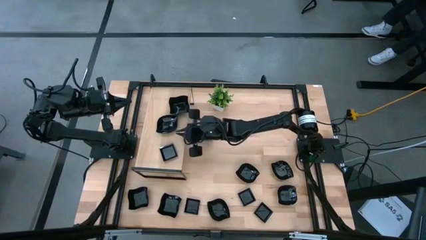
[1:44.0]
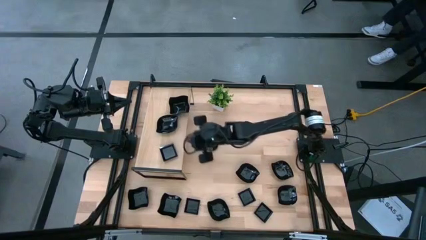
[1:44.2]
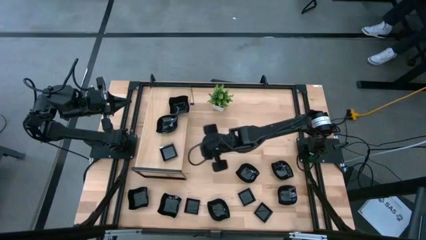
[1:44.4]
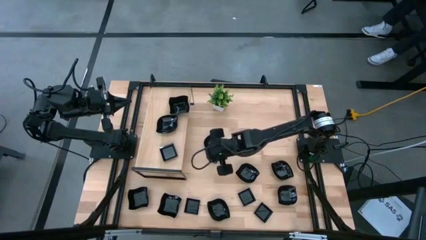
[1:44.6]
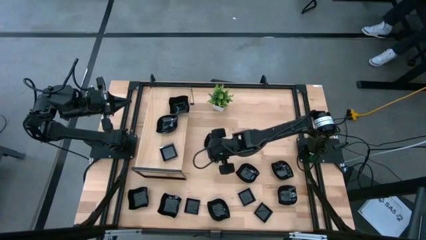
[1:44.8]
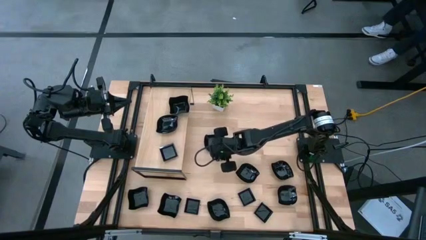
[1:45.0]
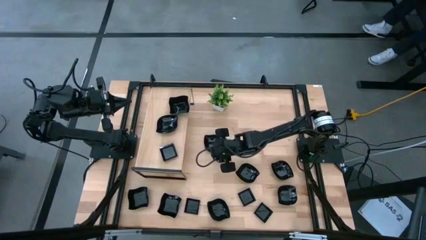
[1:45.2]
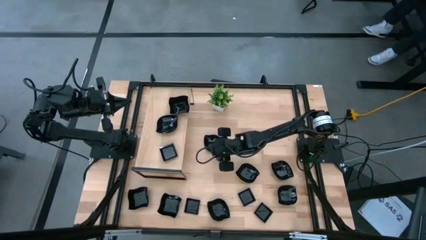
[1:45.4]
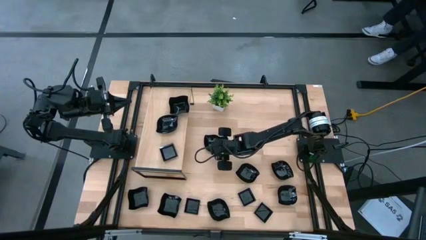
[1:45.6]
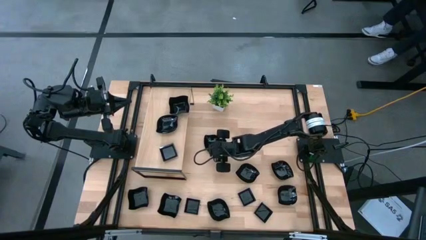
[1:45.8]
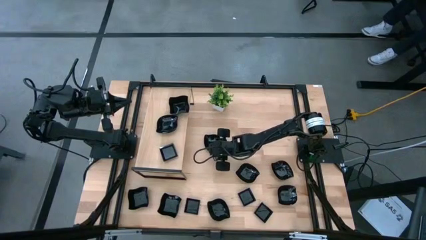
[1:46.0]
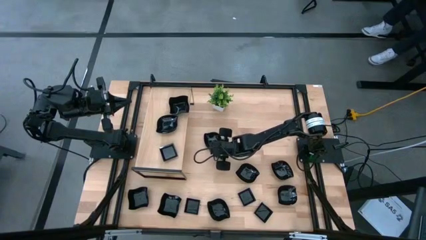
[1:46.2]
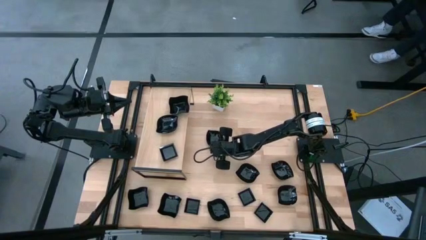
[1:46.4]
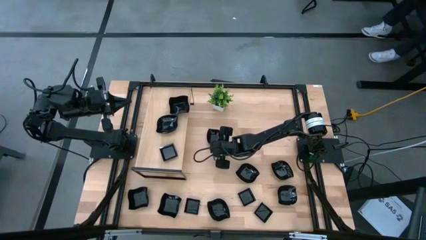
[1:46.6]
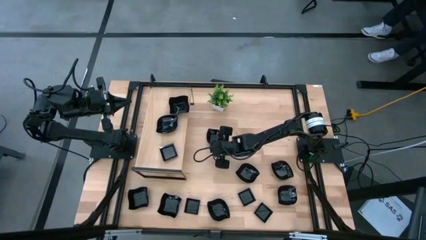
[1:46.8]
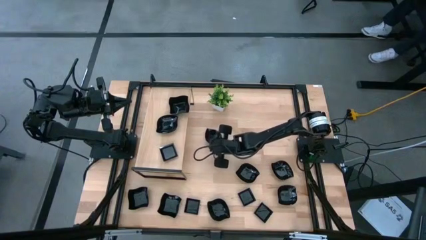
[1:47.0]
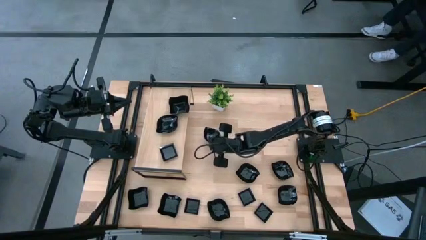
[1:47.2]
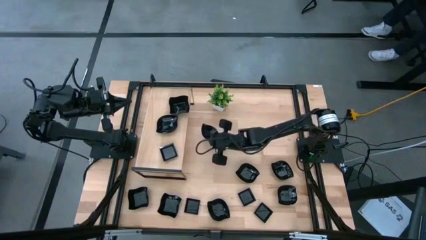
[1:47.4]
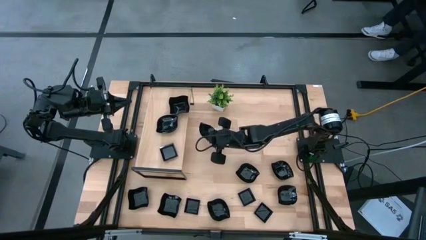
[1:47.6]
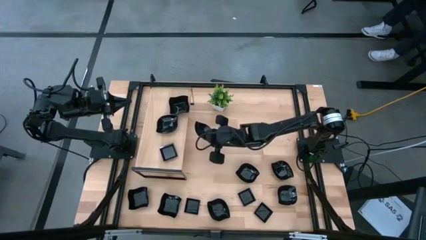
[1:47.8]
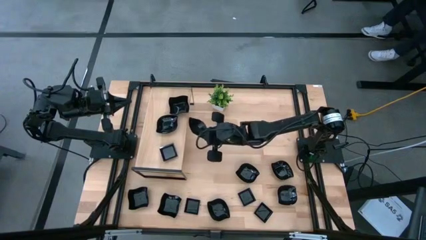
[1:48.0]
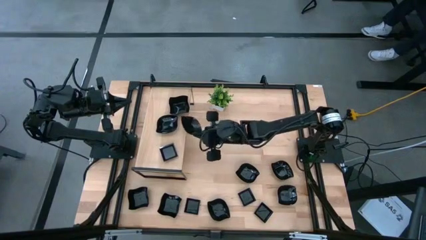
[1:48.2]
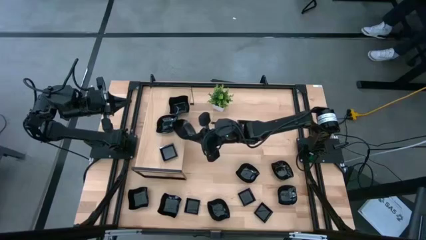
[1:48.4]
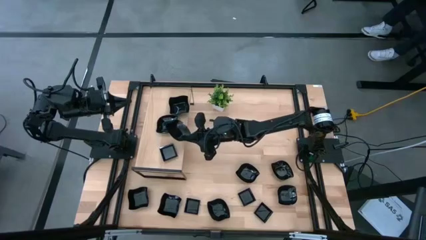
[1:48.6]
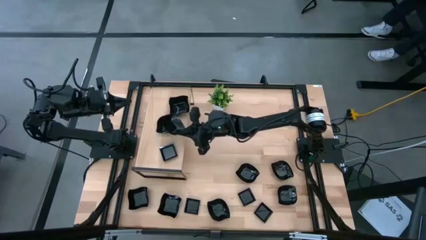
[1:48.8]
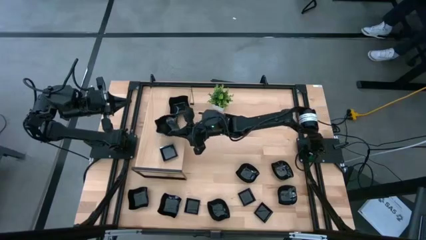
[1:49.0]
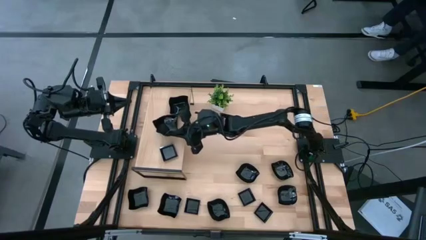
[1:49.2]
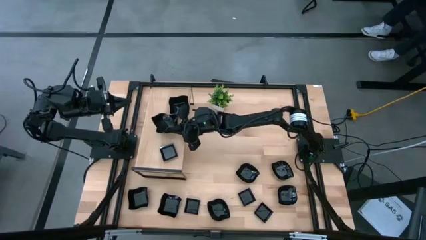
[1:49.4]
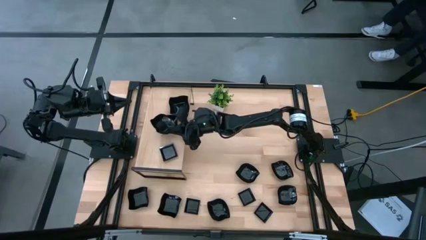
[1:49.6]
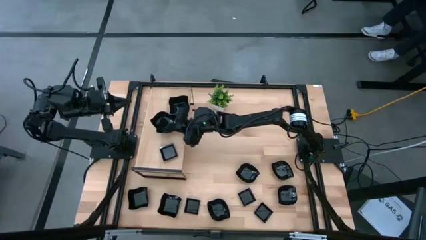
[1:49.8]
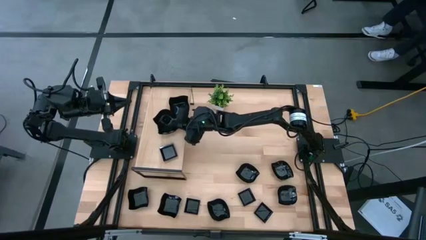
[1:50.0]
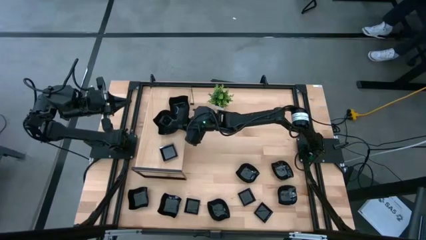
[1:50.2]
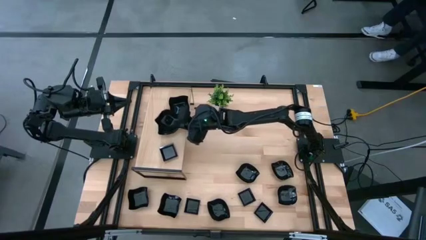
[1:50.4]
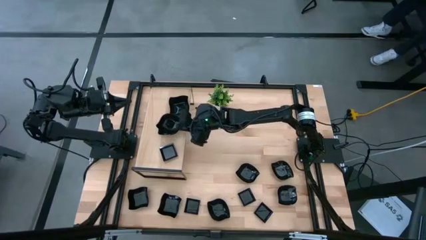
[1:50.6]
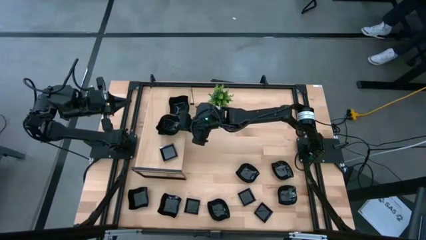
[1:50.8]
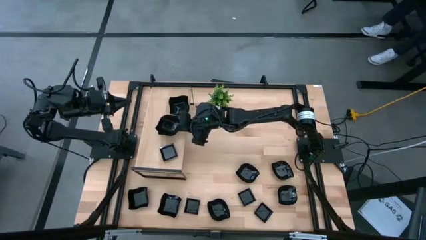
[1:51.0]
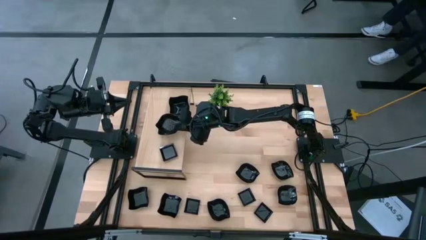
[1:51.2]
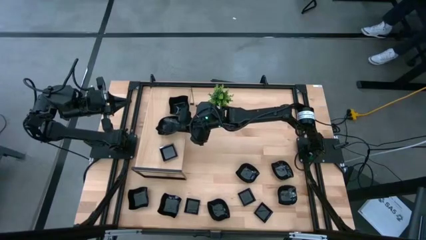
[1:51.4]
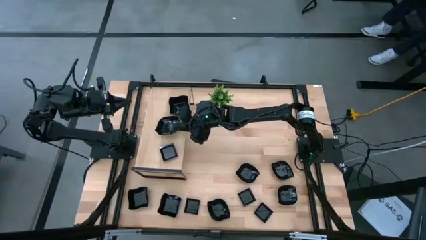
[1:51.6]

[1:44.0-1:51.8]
Task: Pick & Place Mini shaped plates
Stack the black leaf shape bowl on top of the black leaf shape bowl on the shelf

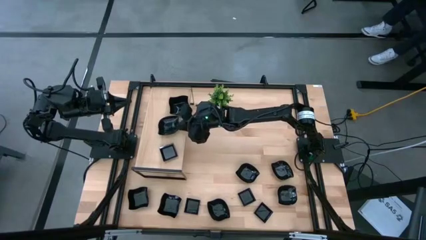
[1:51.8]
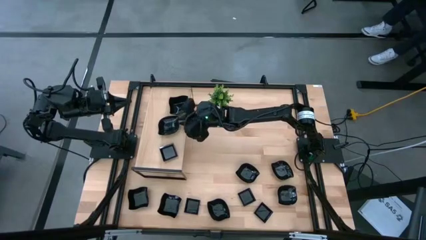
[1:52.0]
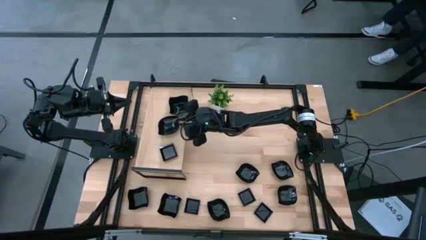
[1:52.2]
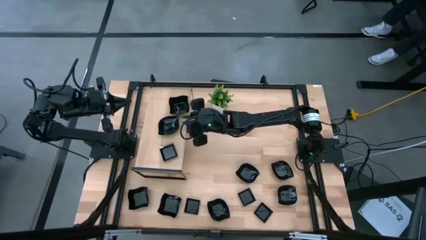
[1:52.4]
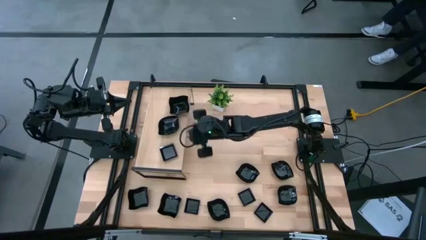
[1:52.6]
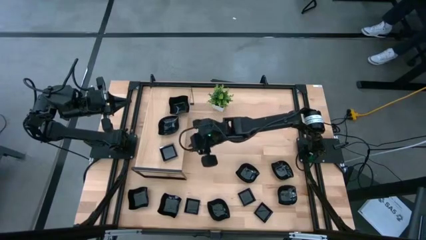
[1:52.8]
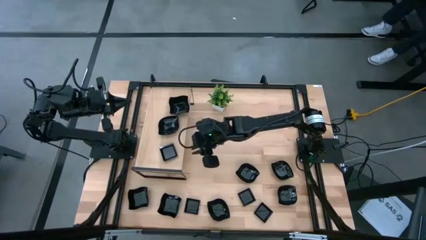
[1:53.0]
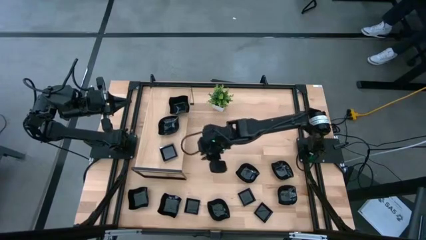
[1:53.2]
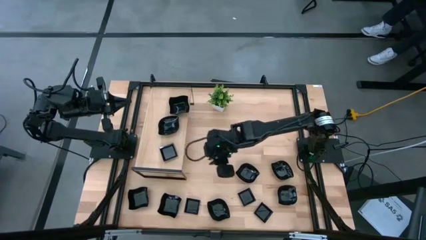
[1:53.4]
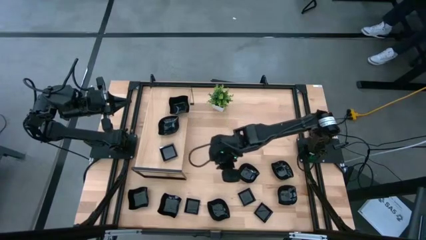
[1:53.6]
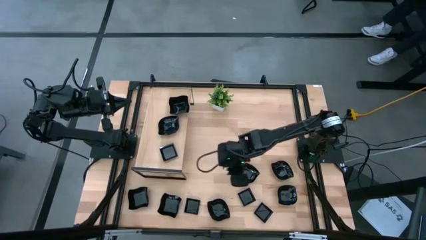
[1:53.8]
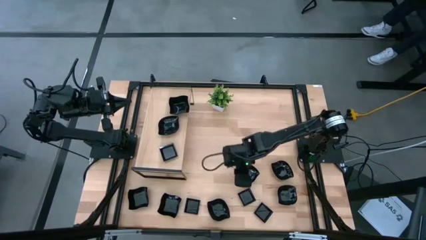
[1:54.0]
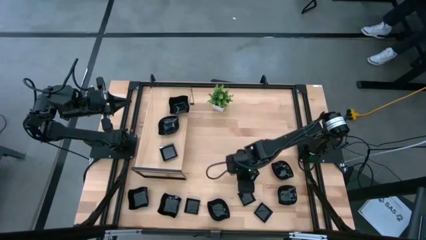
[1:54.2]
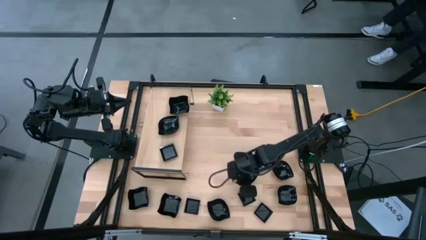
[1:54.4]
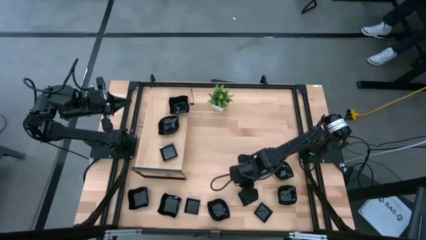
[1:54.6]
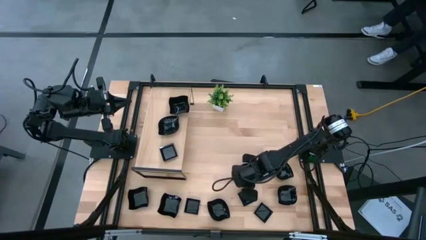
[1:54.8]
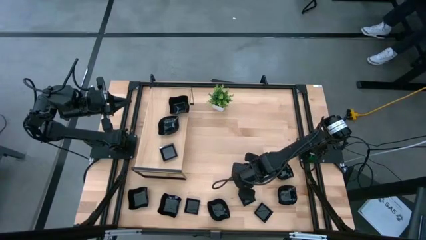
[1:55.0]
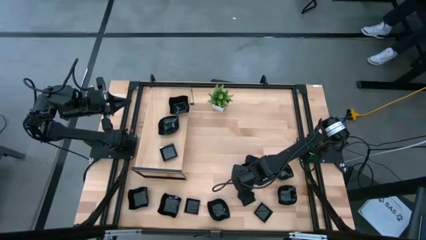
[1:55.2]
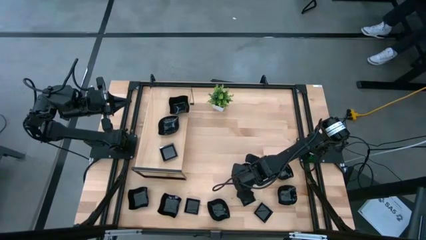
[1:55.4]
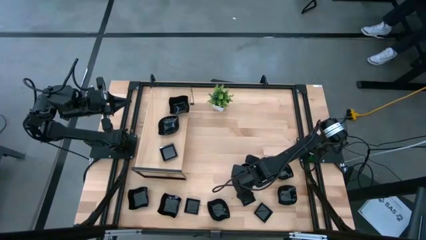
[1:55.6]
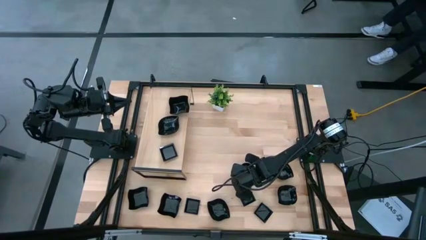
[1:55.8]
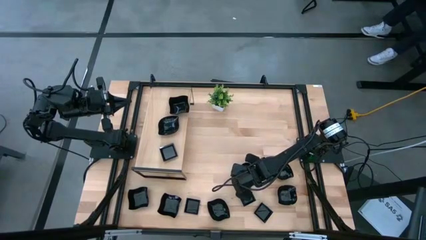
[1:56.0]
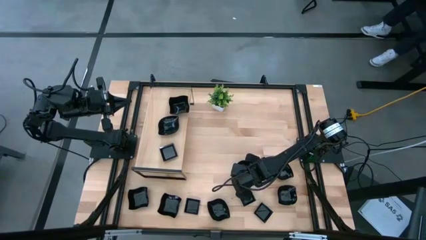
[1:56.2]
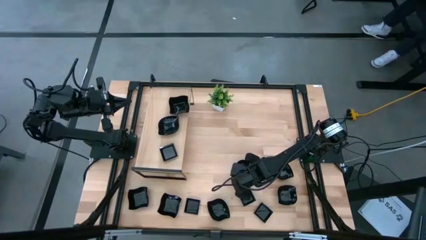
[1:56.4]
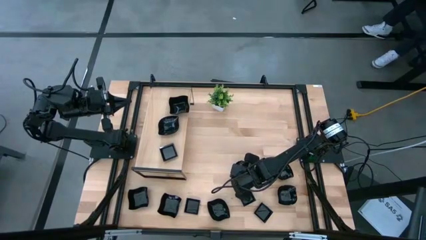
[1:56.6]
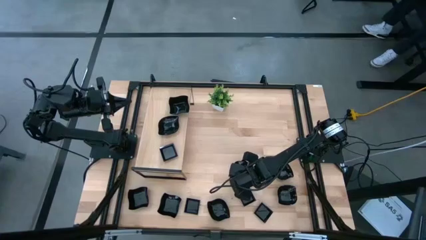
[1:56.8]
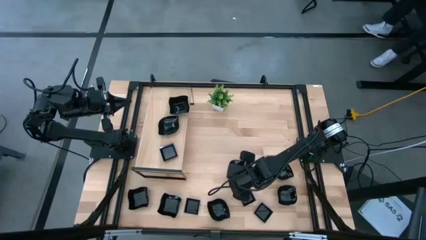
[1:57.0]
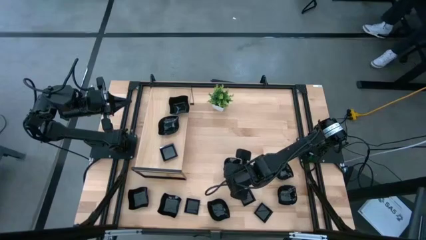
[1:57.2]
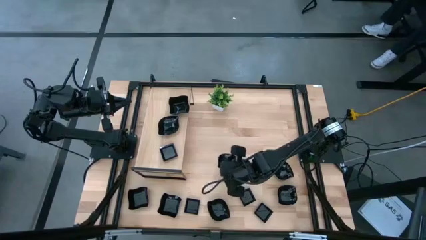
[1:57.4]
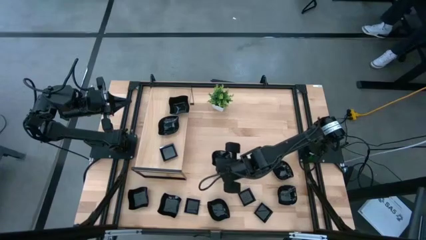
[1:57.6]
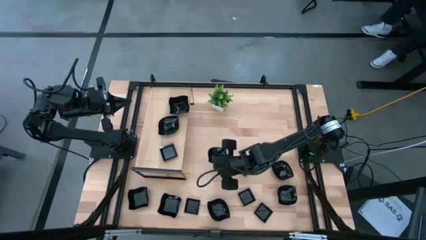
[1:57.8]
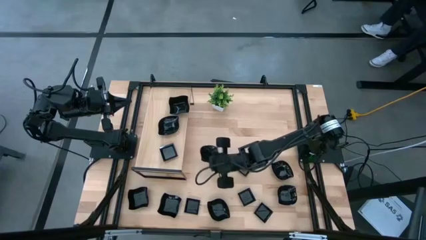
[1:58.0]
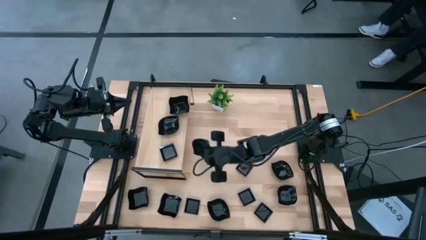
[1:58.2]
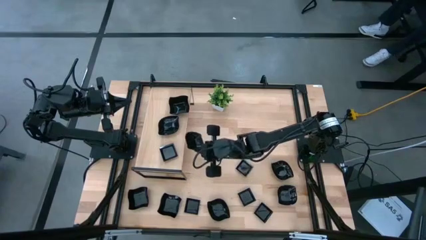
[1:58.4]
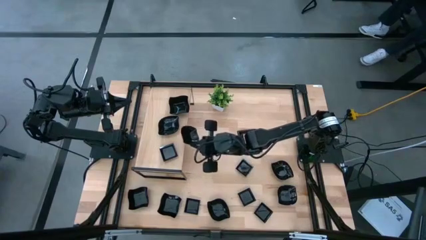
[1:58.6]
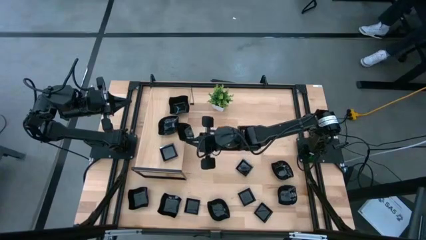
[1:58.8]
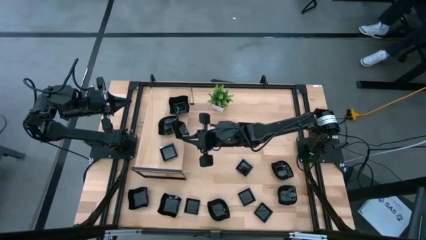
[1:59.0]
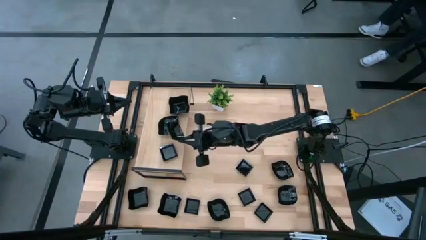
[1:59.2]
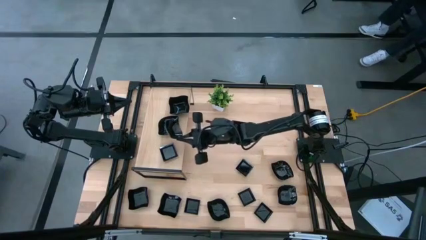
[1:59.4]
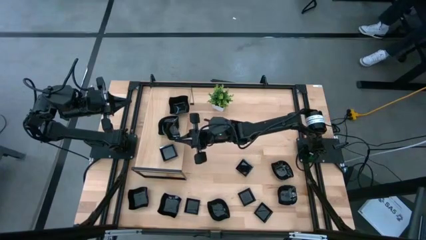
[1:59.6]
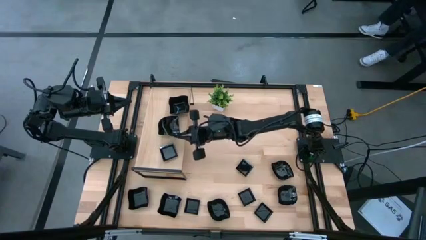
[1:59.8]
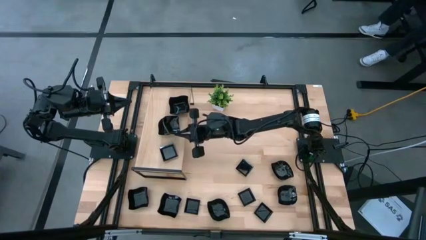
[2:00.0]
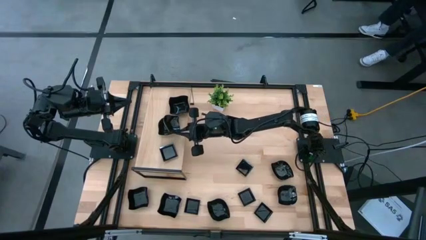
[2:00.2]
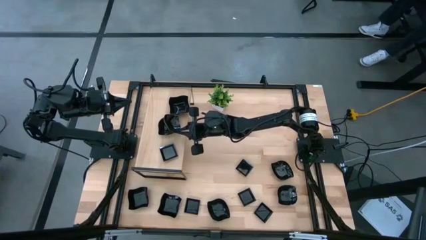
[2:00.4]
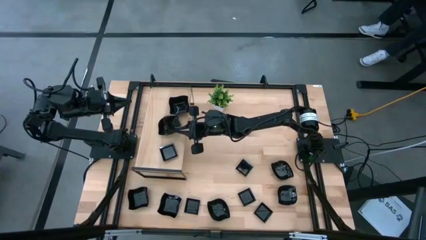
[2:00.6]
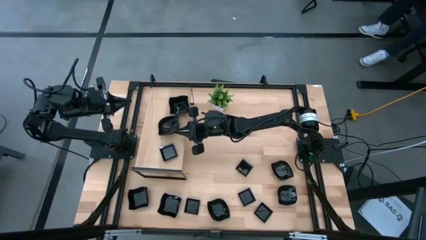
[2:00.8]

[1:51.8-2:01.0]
Stack the black leaf shape bowl on top of the black leaf shape bowl on the shelf
